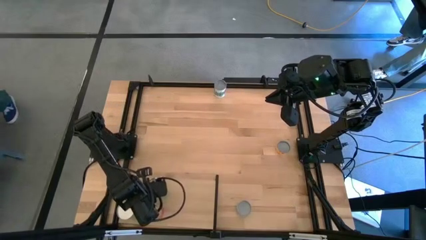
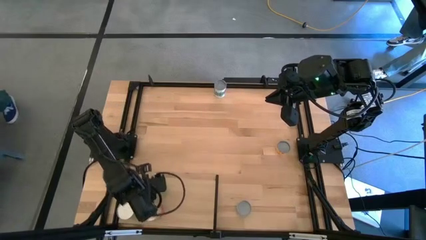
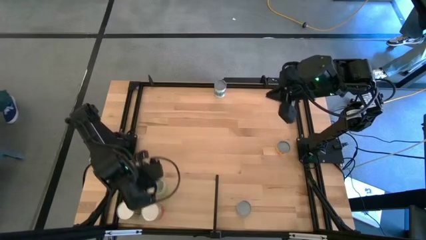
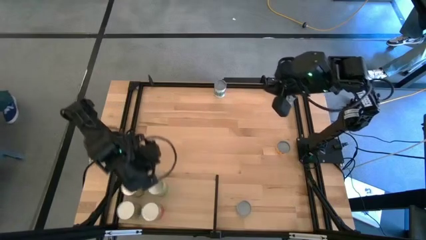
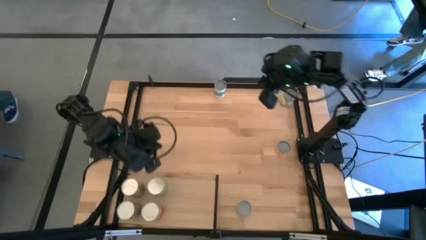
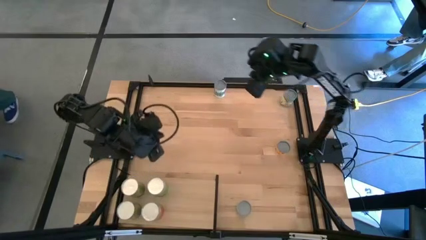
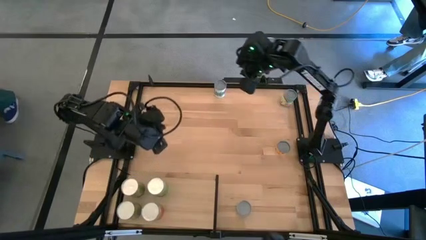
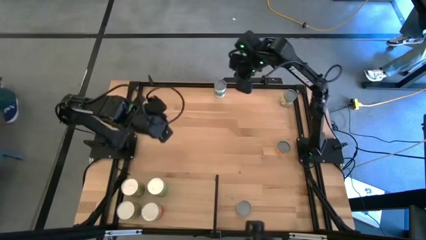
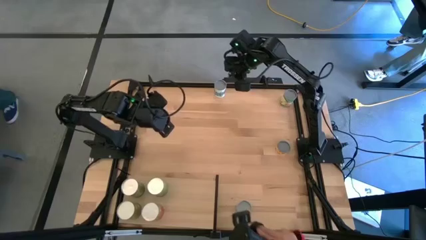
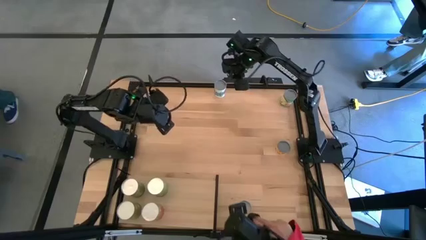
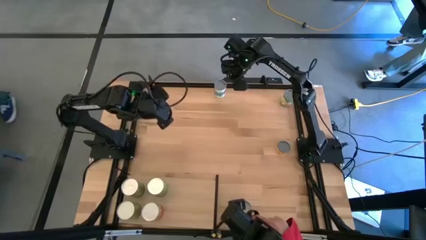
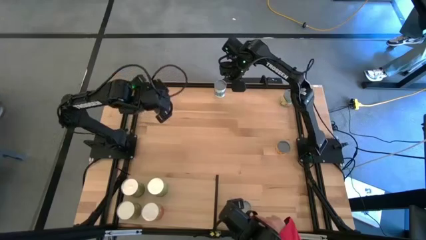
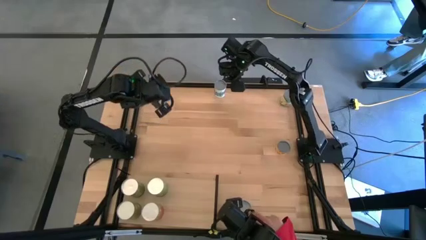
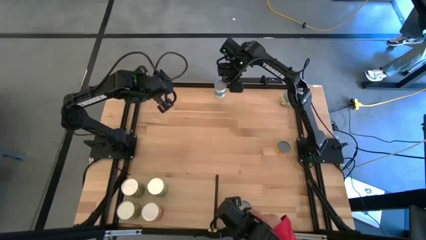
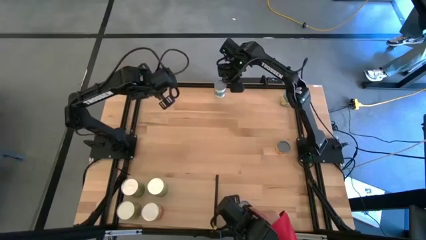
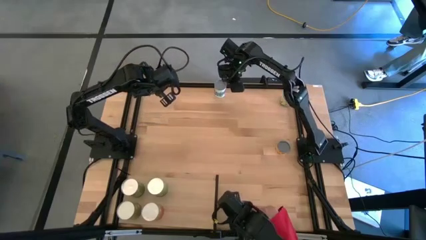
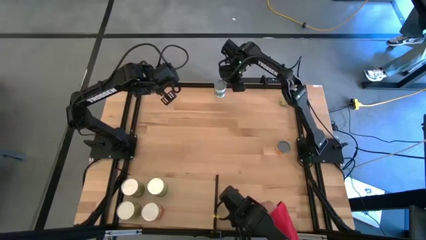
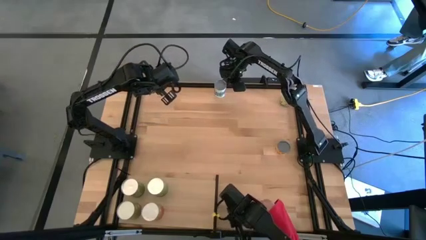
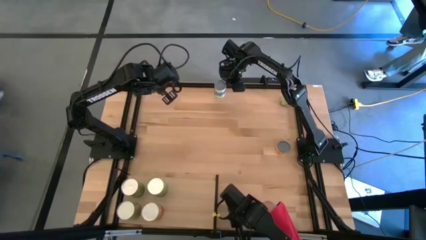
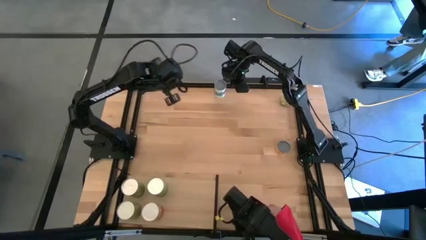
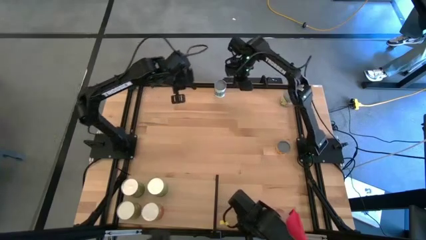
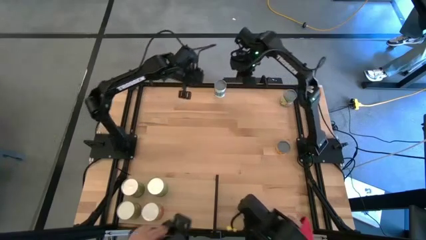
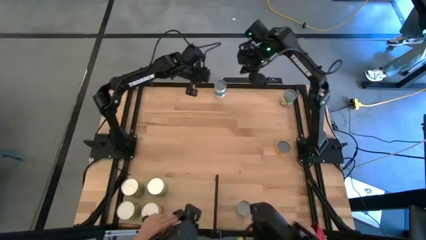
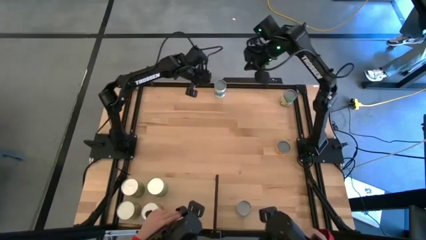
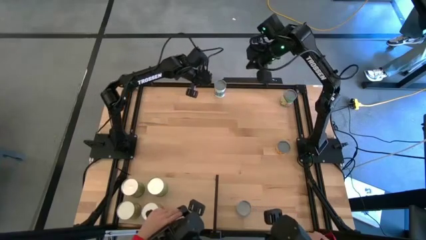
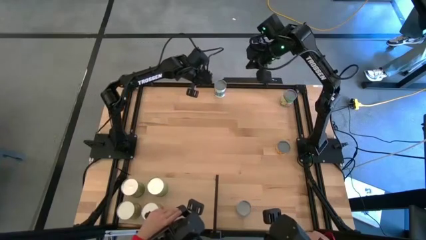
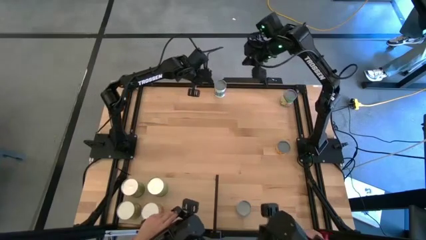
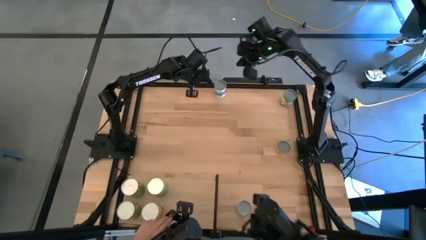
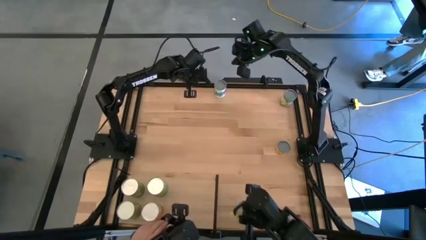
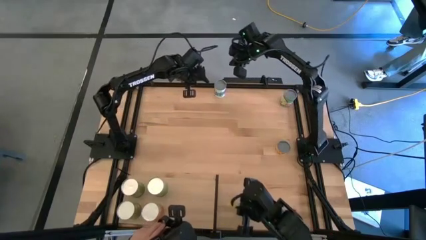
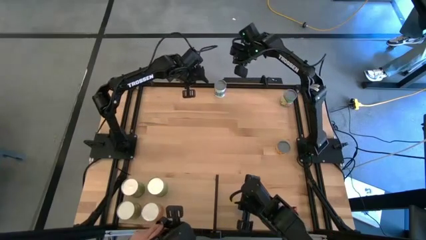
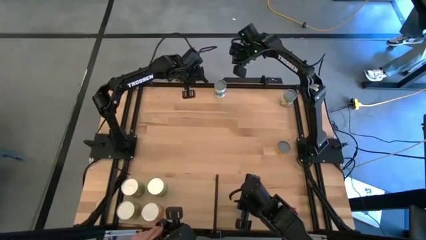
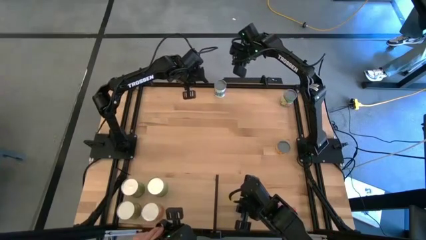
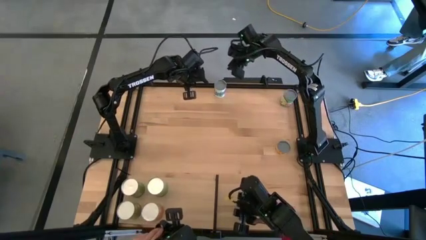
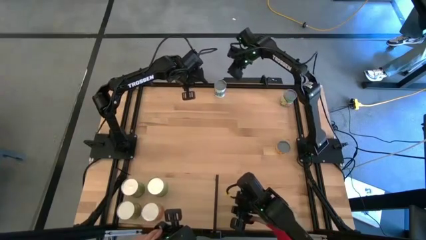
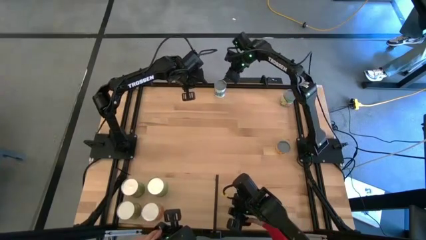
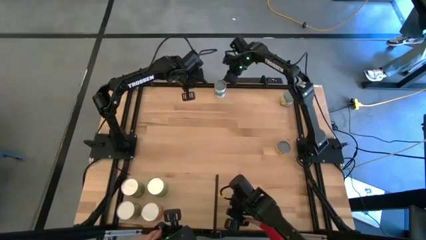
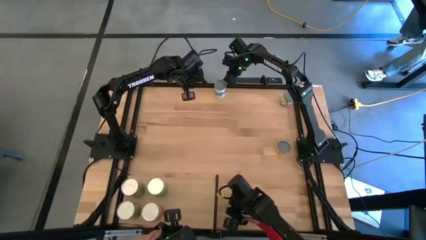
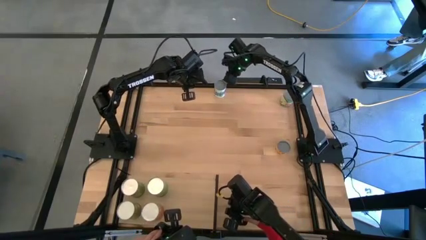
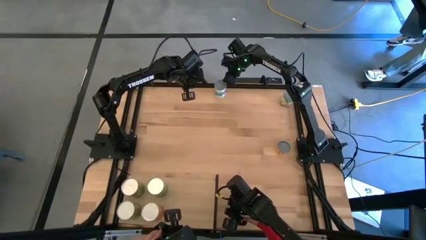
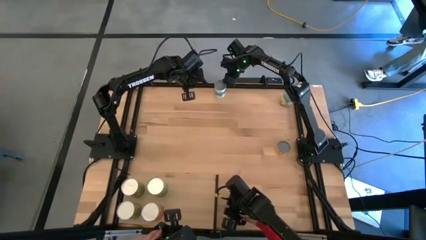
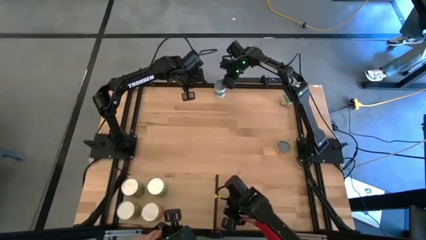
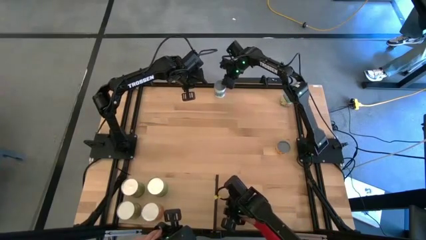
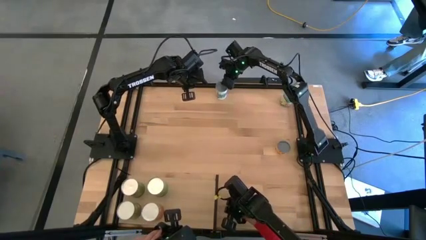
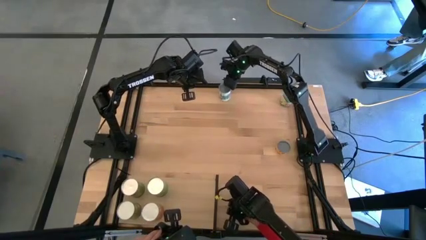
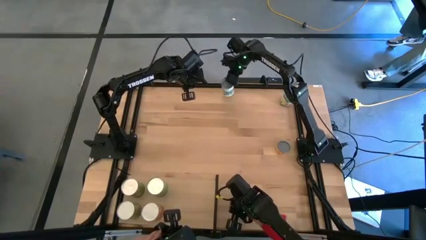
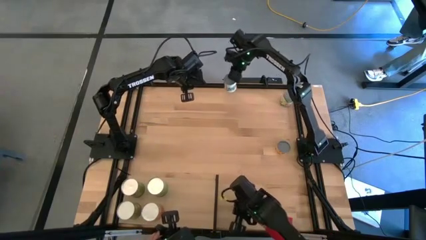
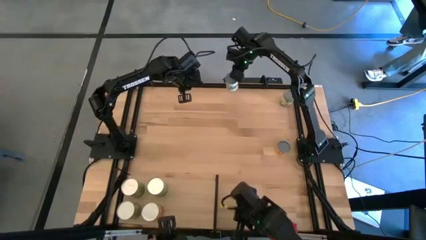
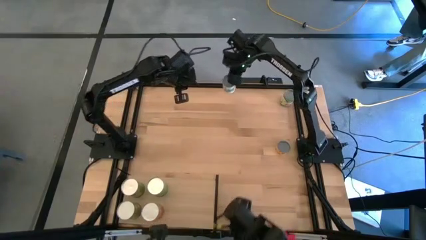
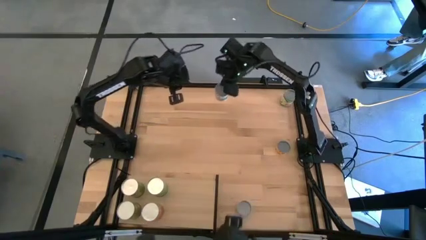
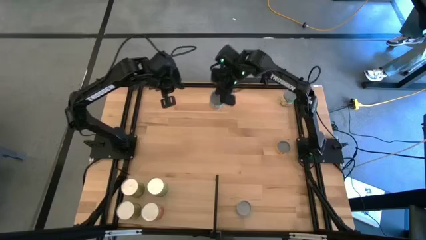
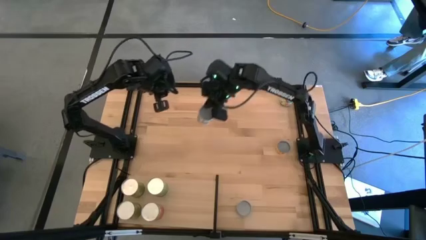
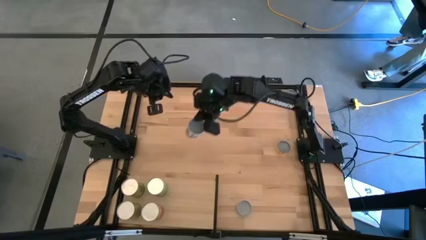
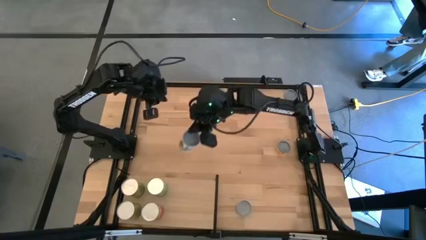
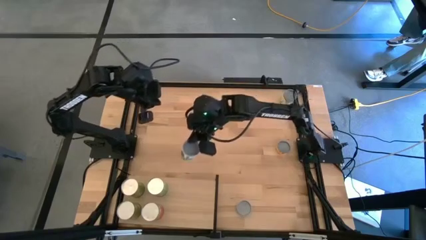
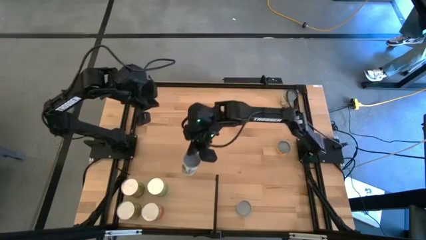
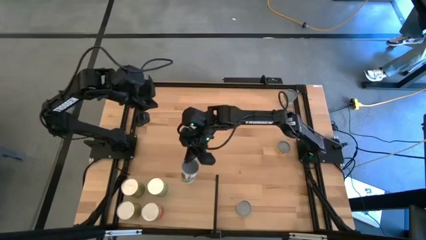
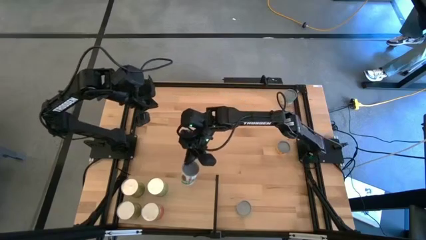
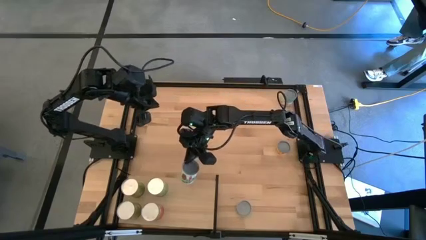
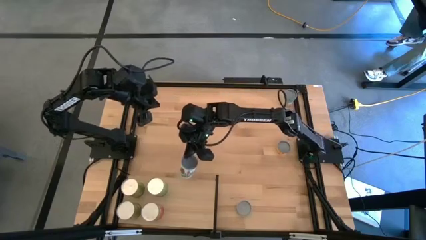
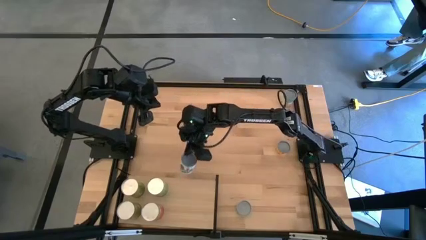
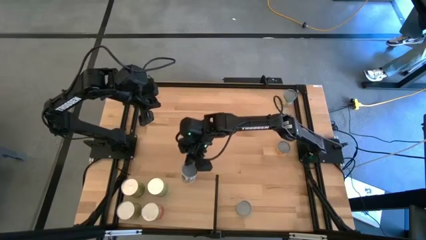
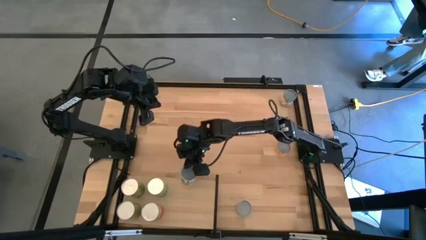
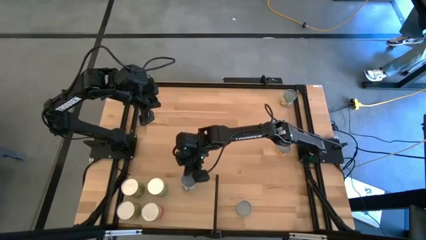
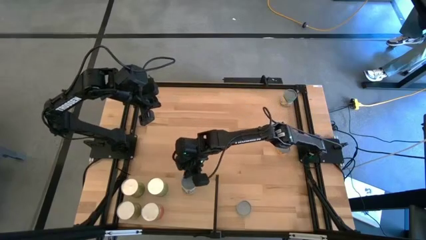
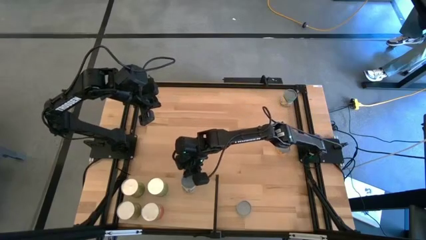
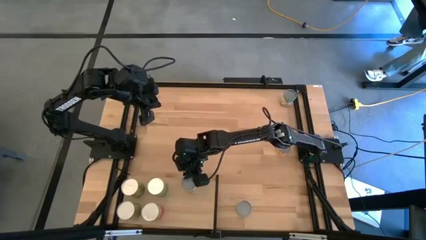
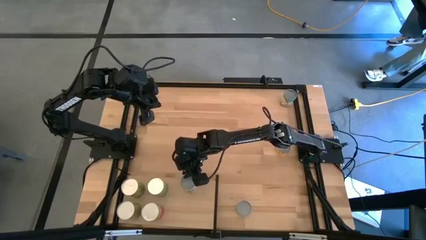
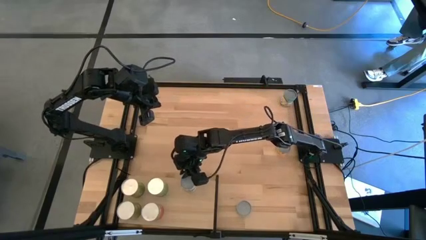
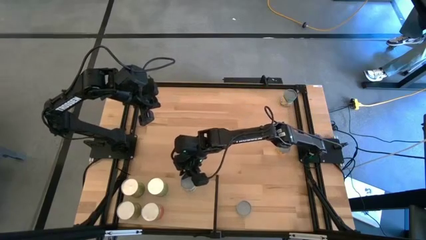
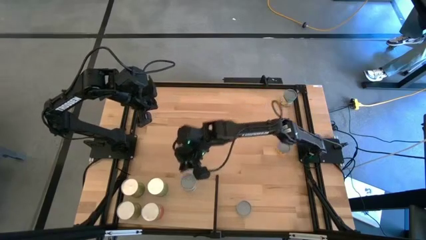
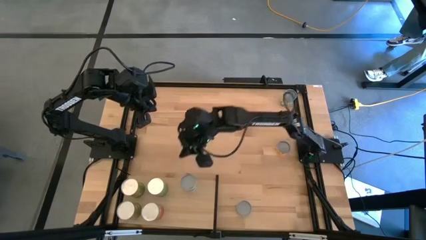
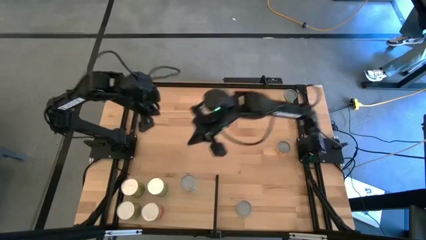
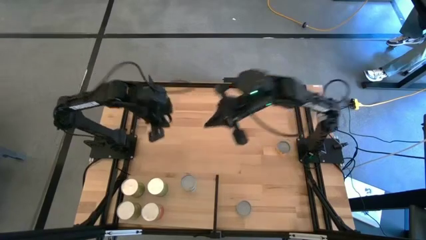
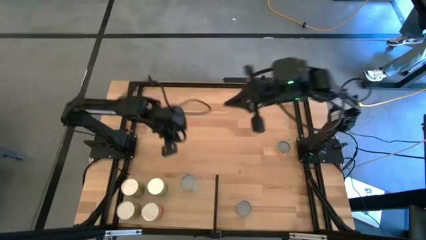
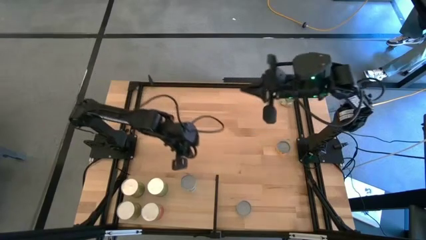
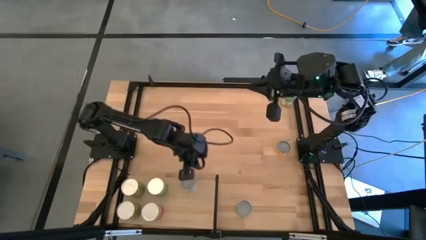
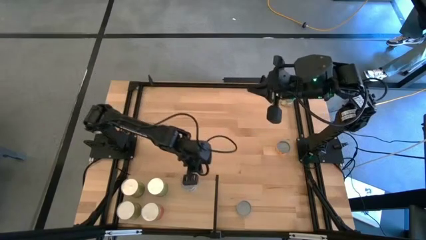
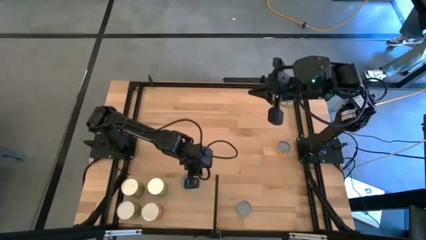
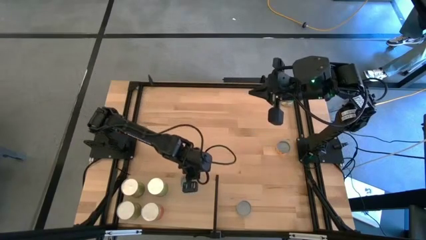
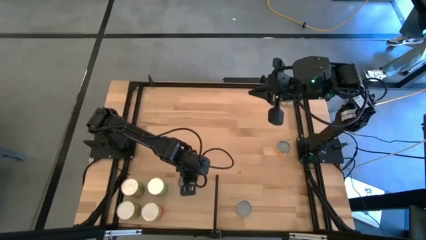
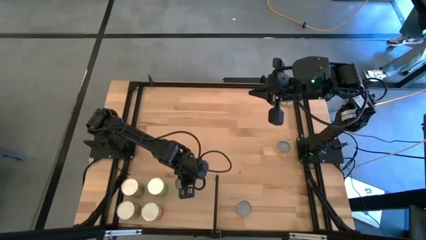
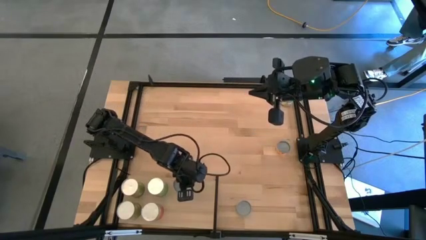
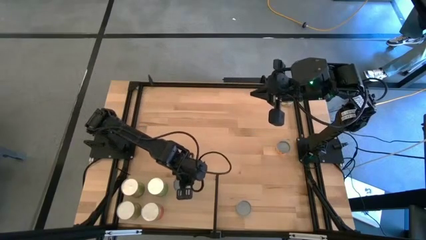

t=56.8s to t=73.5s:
Task: Pick and place cans onto a shelf
Put the canned mix vegetable on the shelf
